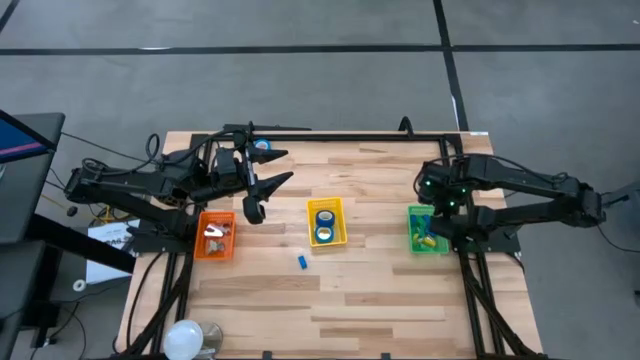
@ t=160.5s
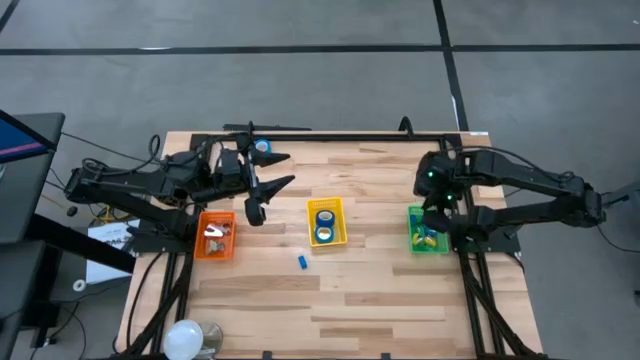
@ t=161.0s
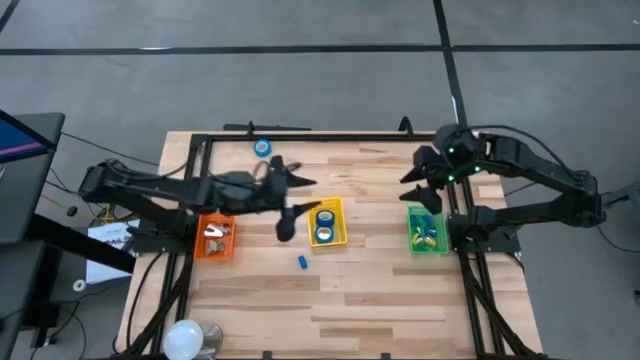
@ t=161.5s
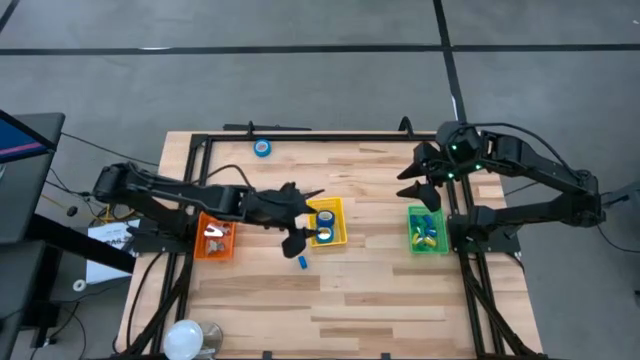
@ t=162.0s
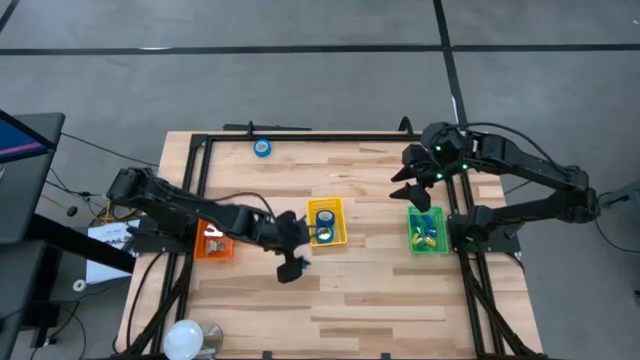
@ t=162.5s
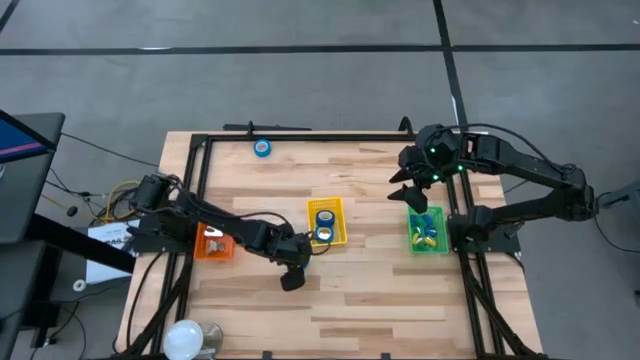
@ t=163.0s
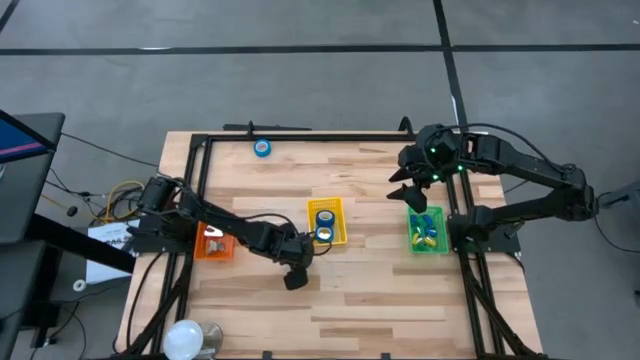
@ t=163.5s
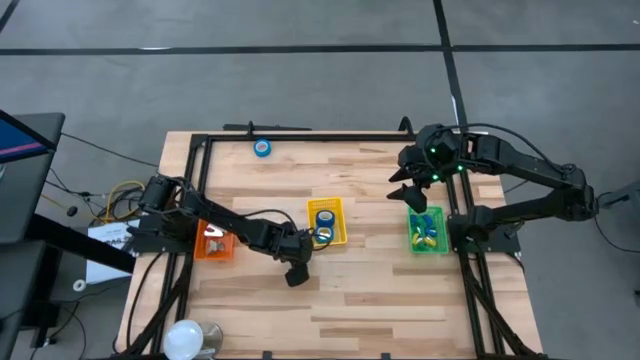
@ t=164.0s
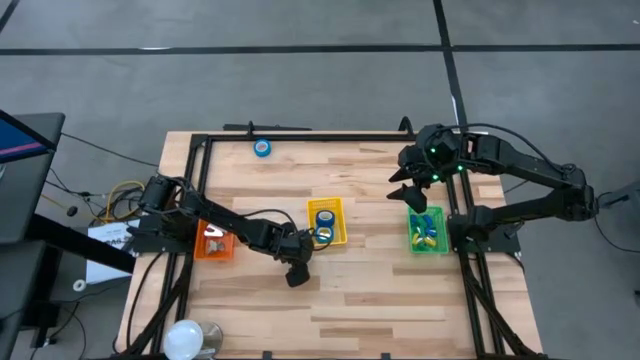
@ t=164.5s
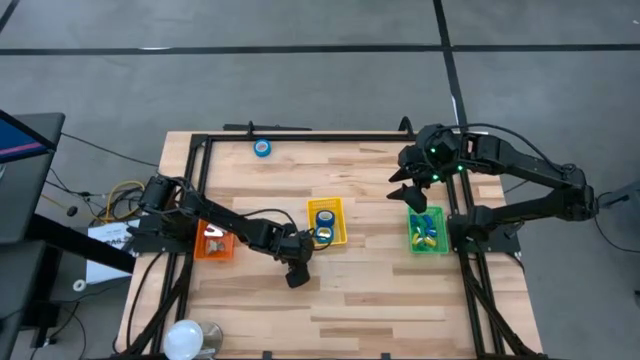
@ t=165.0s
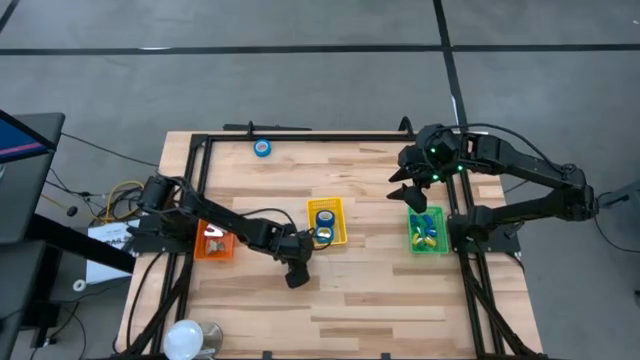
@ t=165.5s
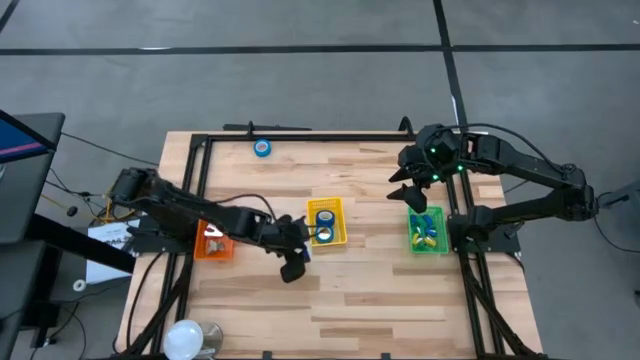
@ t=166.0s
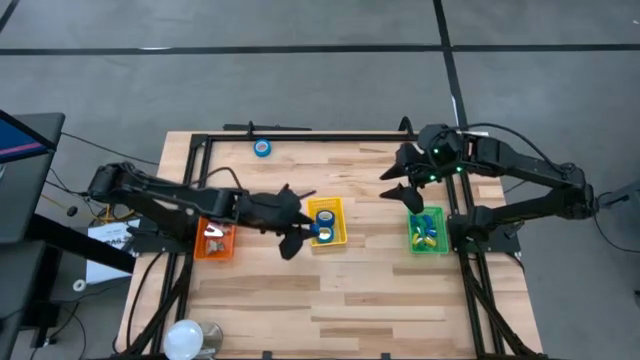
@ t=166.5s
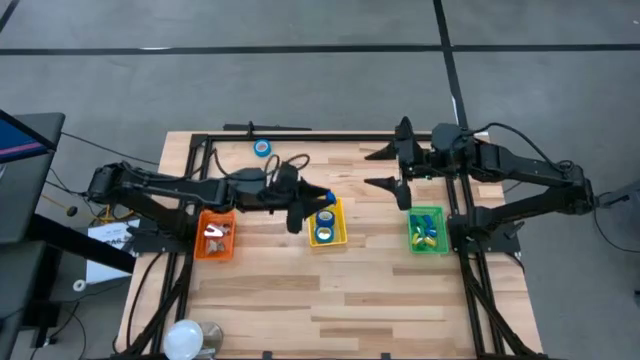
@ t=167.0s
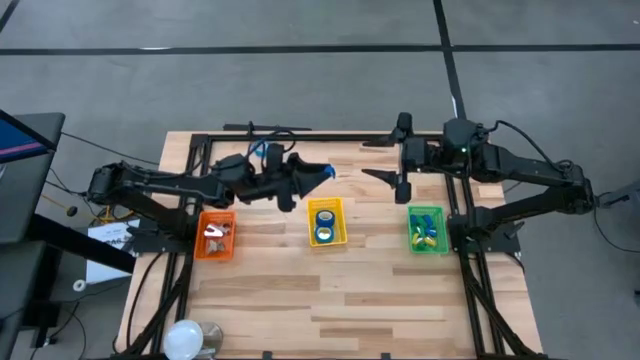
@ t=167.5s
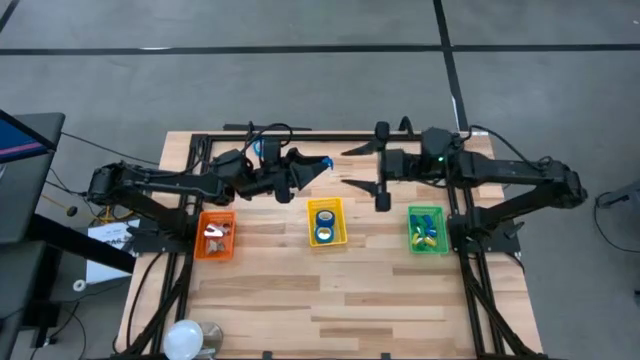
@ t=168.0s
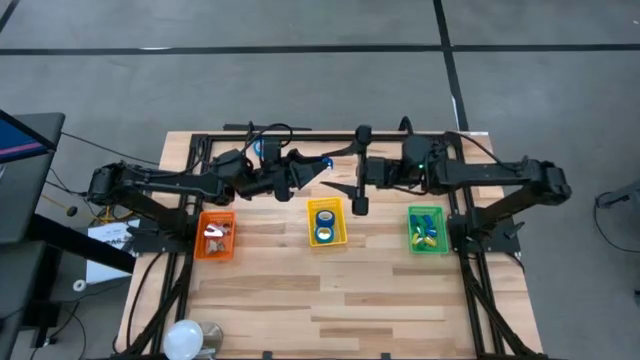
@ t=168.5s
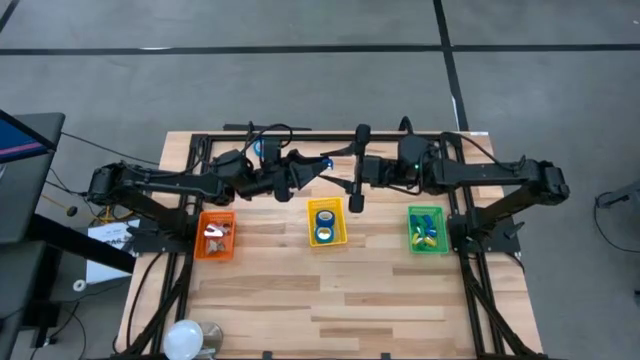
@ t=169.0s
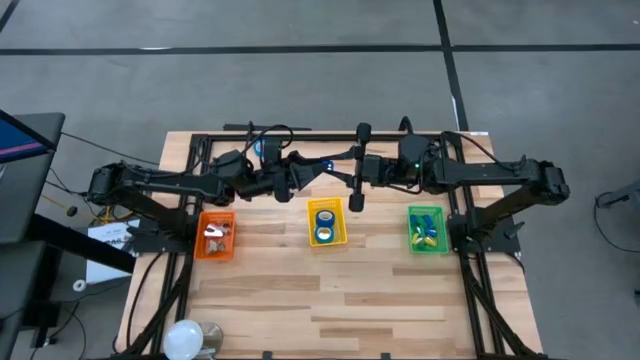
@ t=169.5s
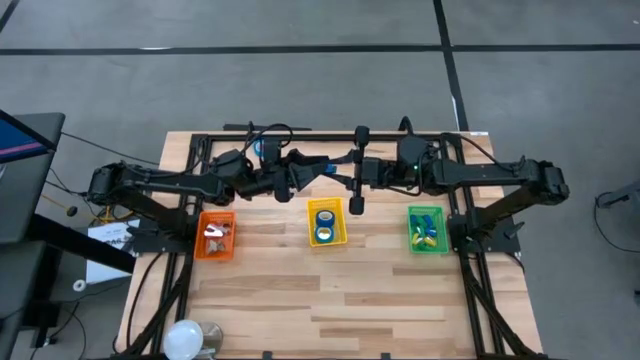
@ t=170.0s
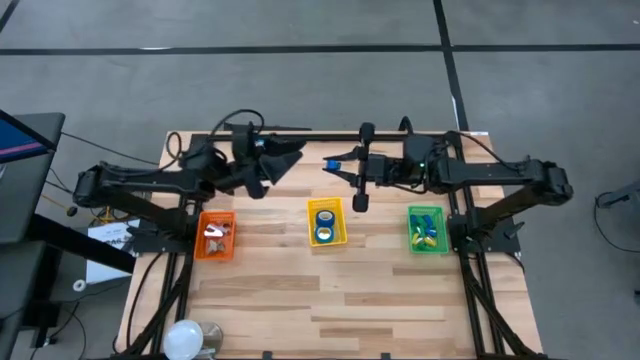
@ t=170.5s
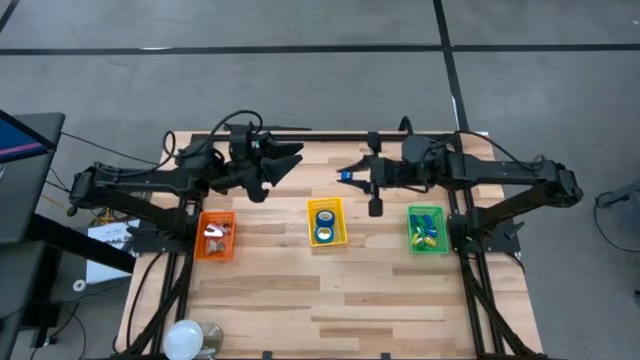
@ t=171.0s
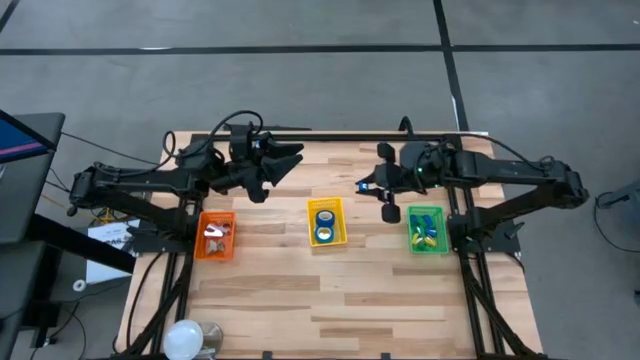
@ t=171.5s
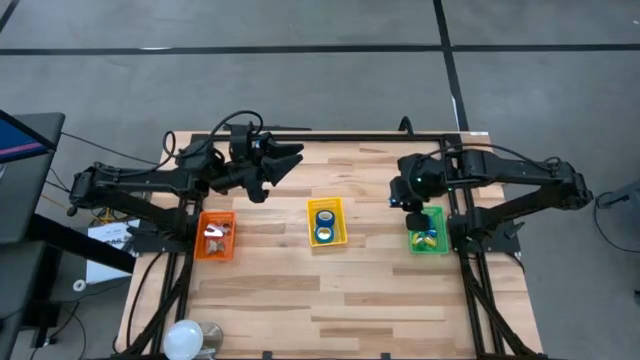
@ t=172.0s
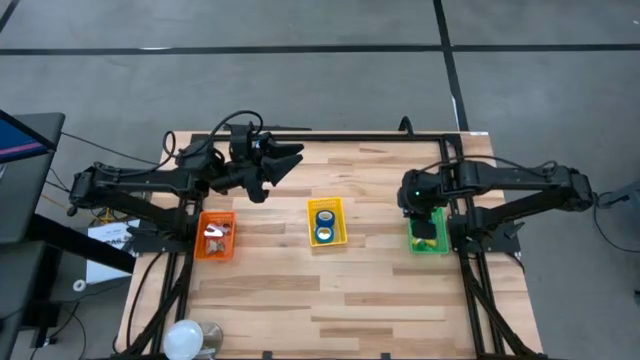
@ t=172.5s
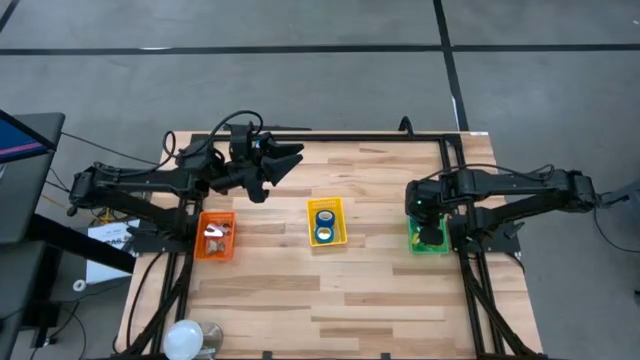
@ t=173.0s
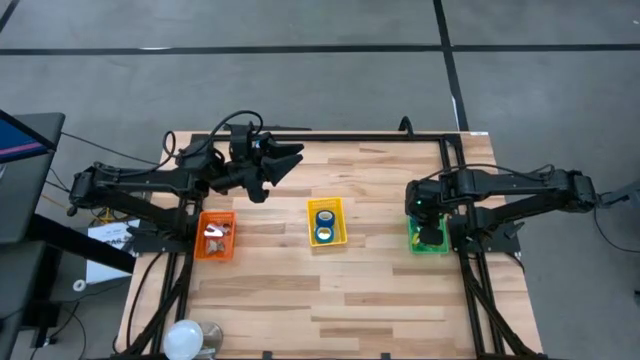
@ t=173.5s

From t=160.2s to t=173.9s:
Task: Pick and place Stapler, Stapler remover, tape
Put the blue stapler into the green basket

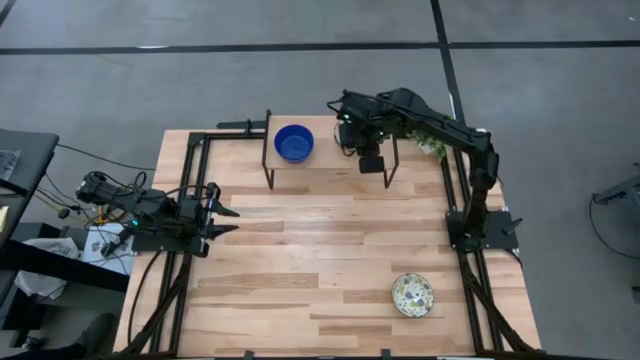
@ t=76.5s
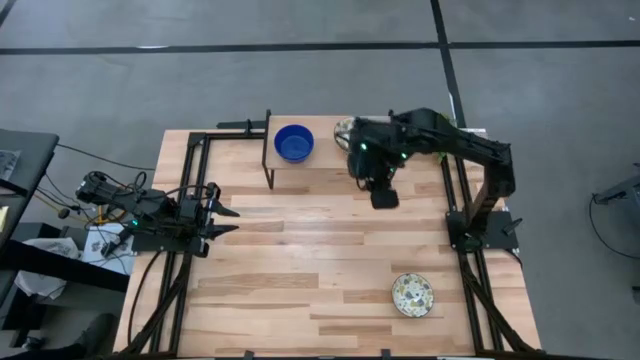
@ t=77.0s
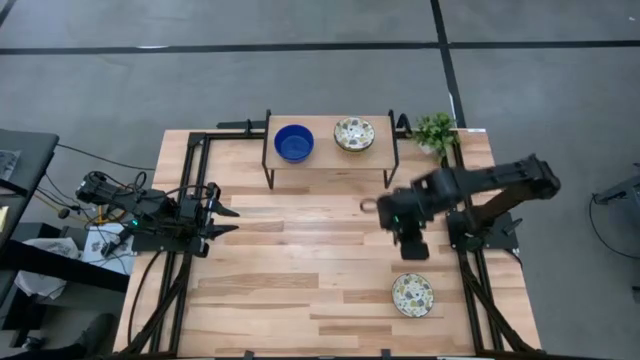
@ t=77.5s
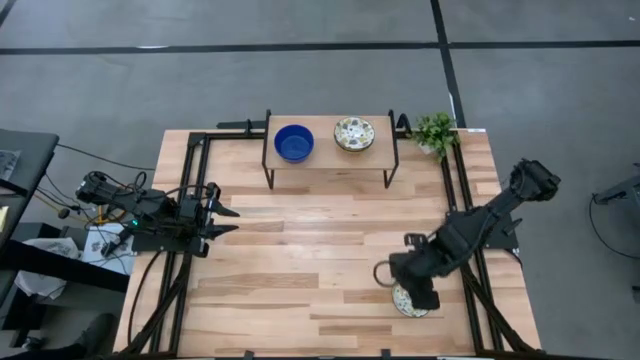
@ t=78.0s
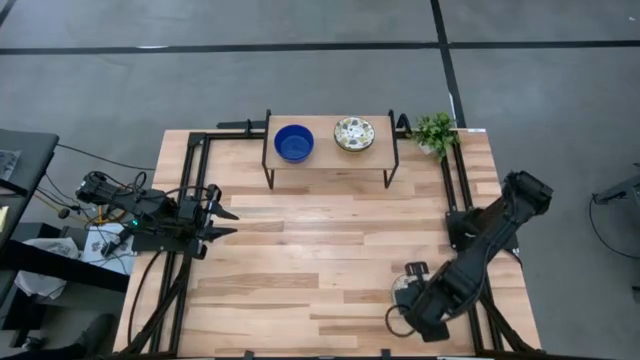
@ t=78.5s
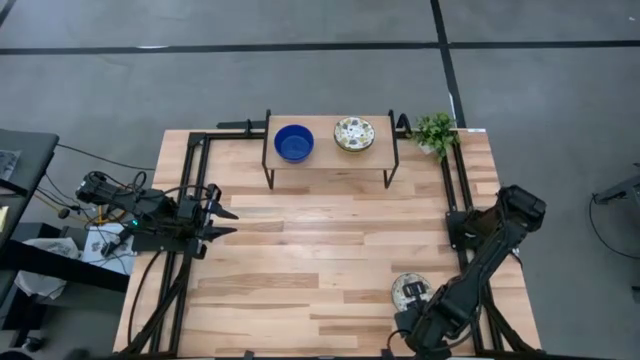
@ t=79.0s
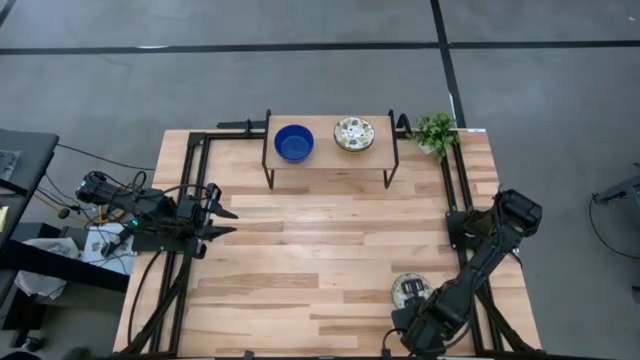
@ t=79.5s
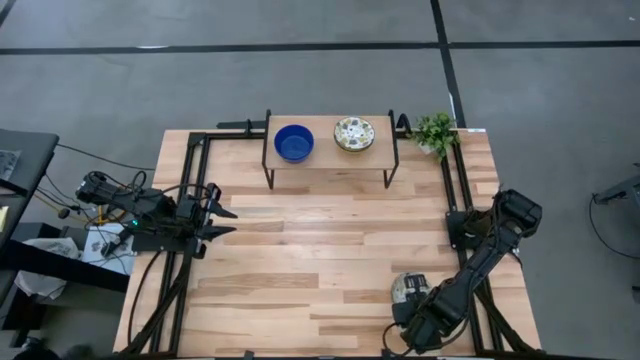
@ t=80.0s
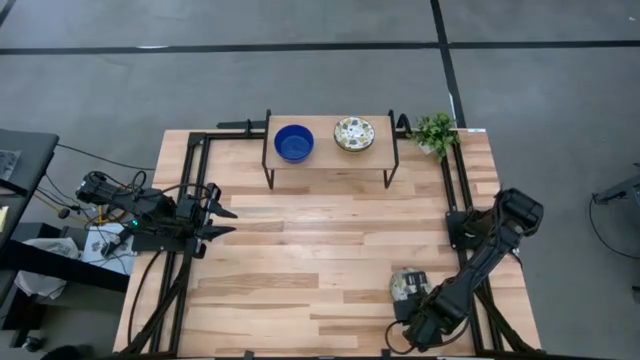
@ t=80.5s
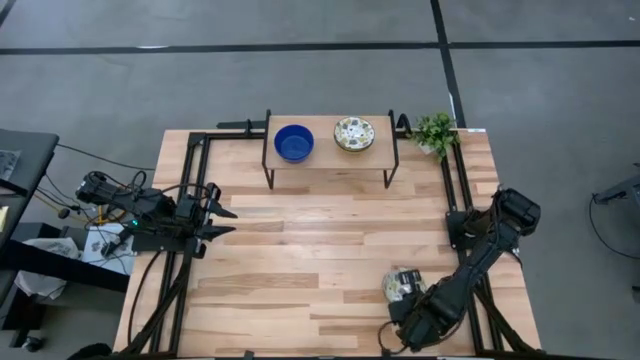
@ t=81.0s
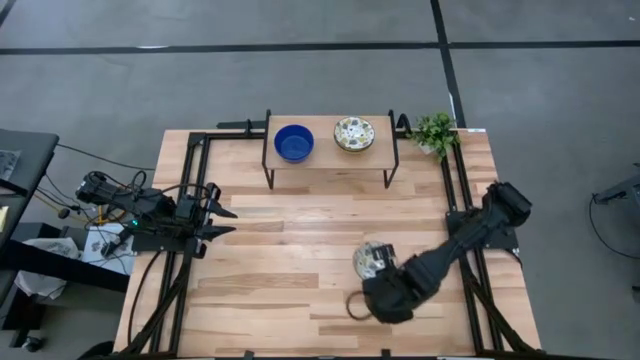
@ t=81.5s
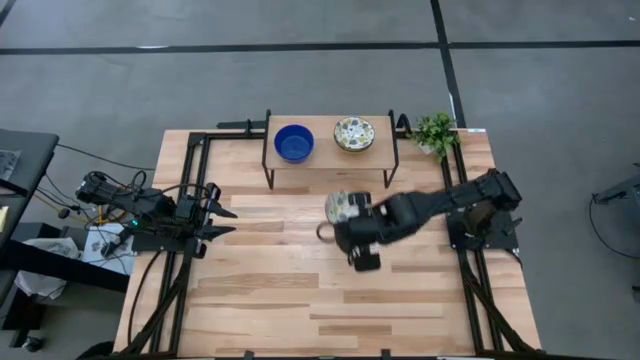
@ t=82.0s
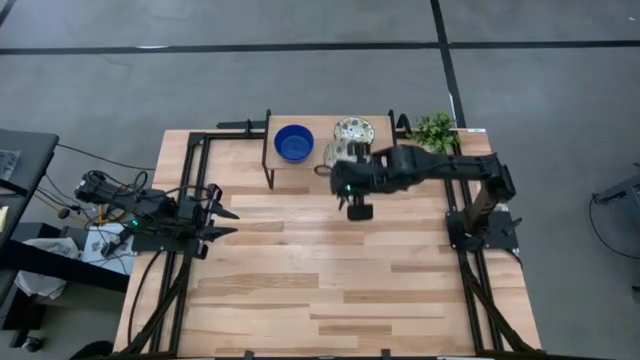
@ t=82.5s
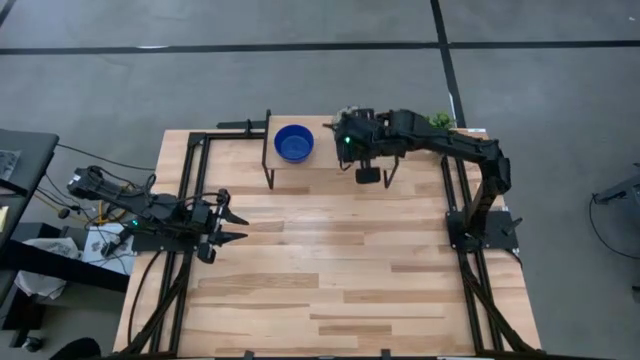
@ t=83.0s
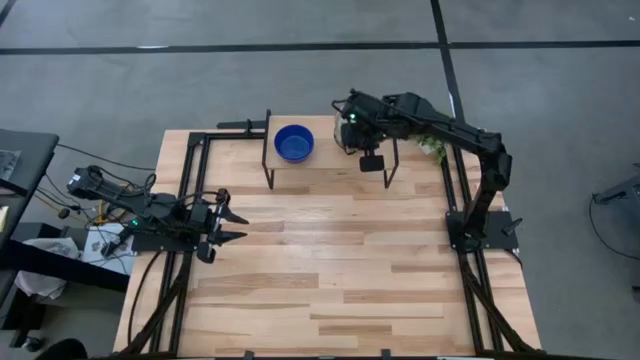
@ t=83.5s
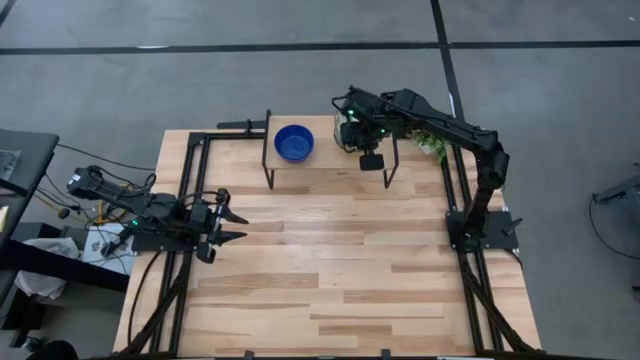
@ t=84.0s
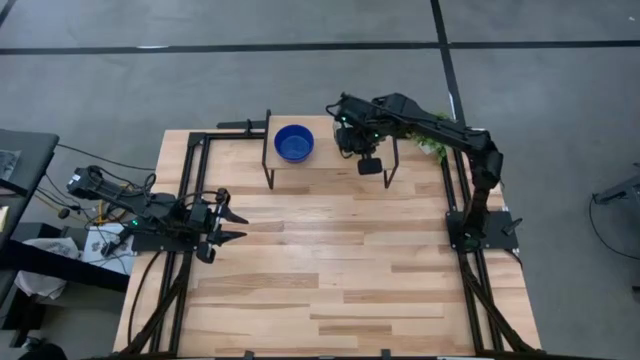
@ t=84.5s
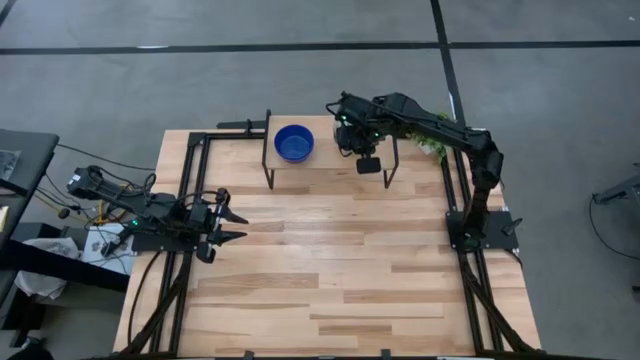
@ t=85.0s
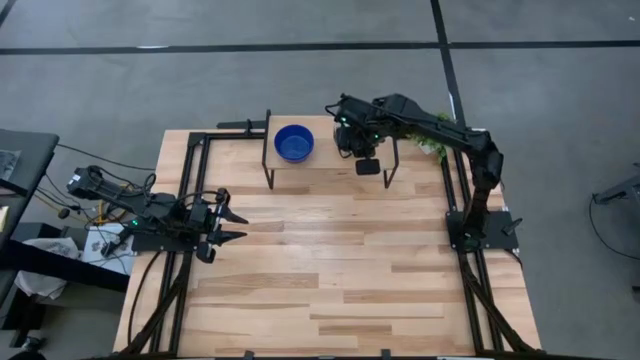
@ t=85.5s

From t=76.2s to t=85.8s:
Task: Pick & Place Mini bowls
Stack the yellow patterned bowl on the yellow patterned bowls on the shelf
